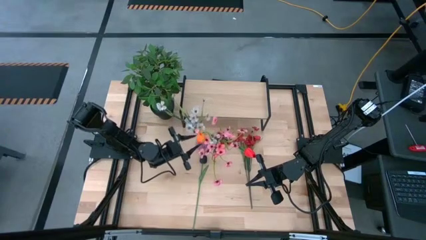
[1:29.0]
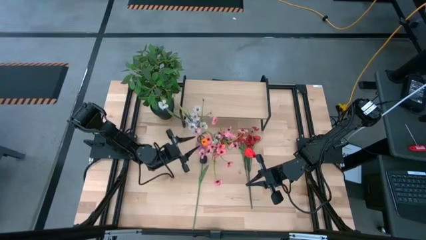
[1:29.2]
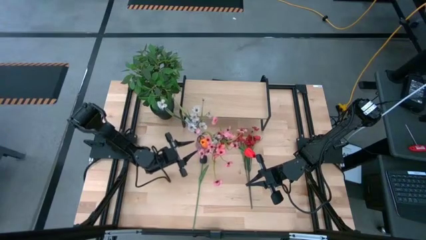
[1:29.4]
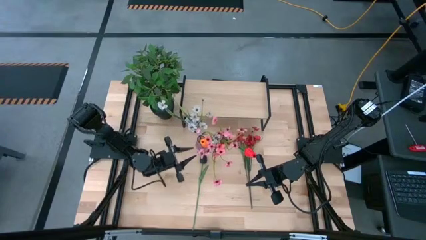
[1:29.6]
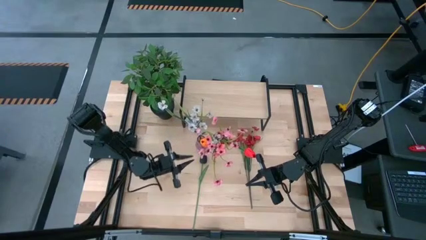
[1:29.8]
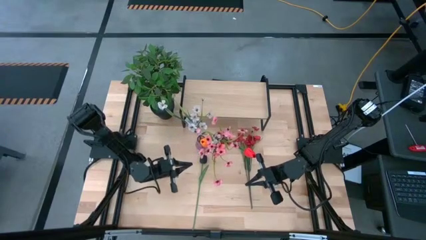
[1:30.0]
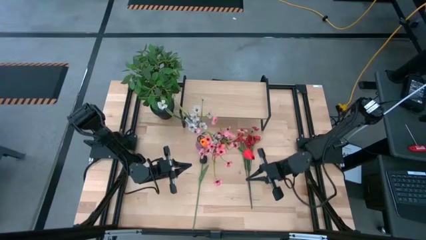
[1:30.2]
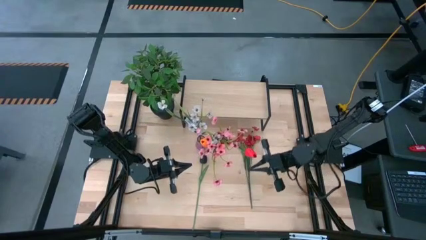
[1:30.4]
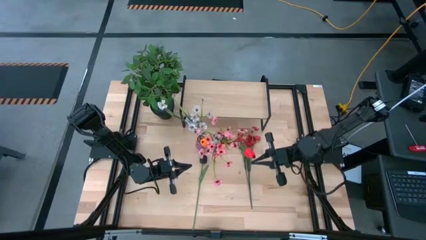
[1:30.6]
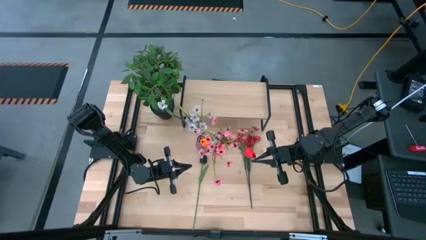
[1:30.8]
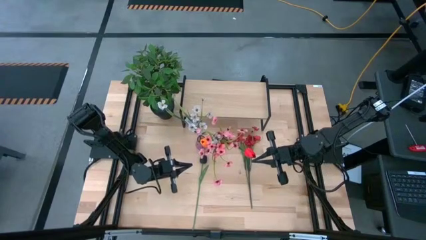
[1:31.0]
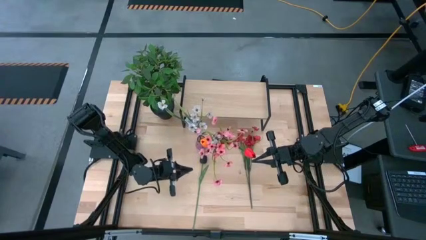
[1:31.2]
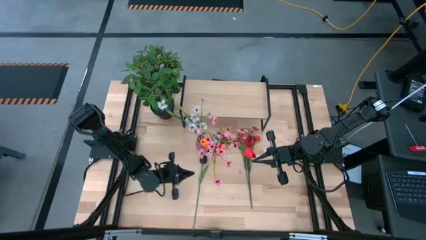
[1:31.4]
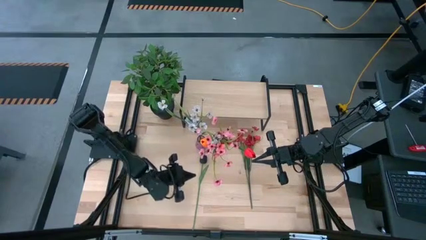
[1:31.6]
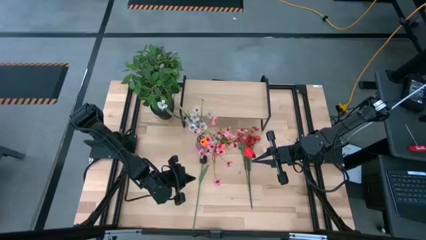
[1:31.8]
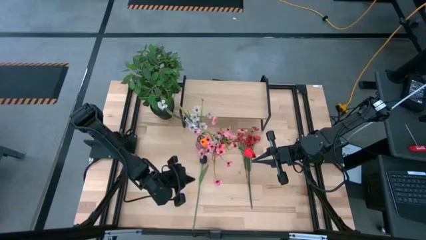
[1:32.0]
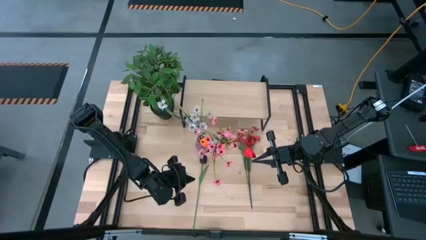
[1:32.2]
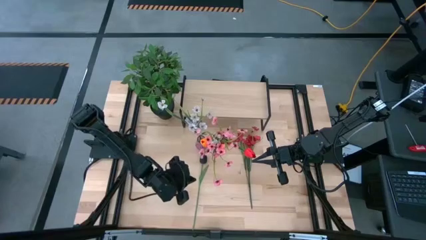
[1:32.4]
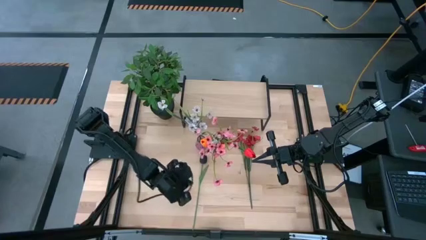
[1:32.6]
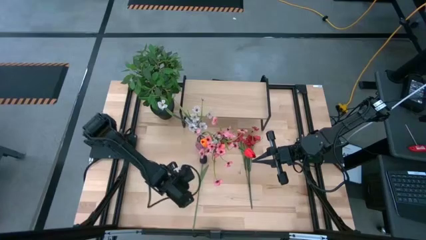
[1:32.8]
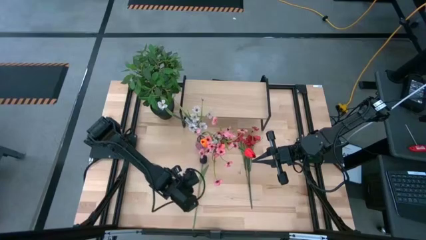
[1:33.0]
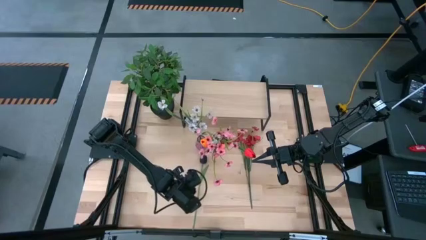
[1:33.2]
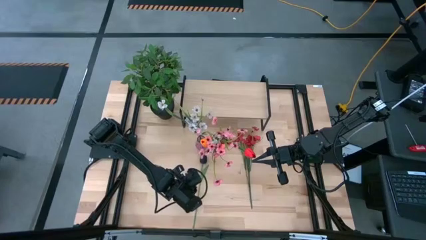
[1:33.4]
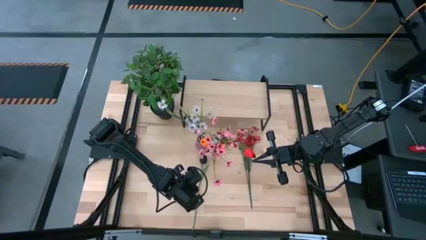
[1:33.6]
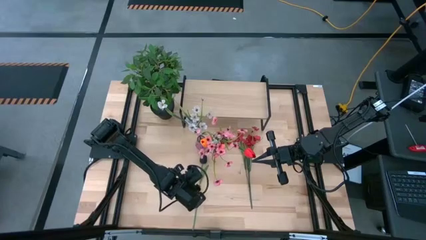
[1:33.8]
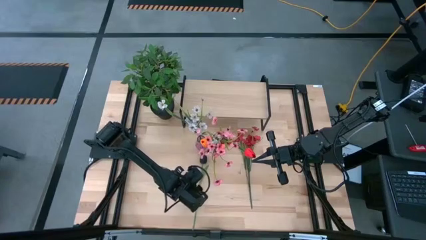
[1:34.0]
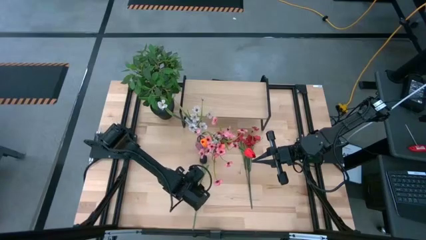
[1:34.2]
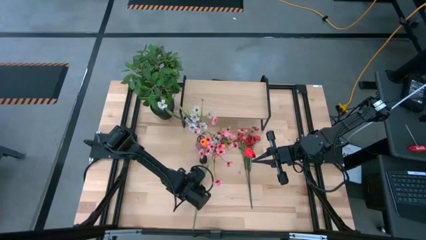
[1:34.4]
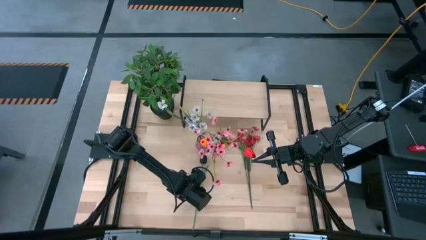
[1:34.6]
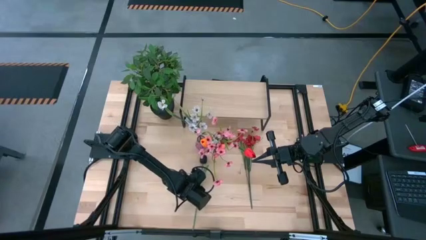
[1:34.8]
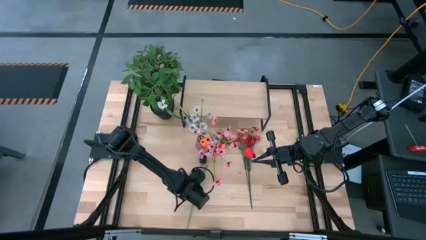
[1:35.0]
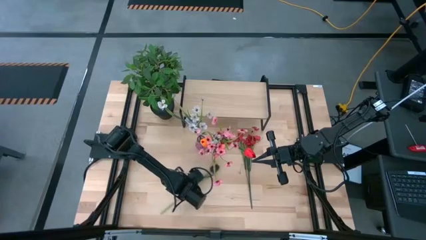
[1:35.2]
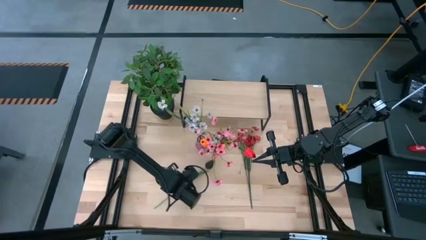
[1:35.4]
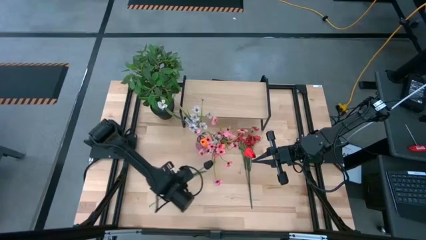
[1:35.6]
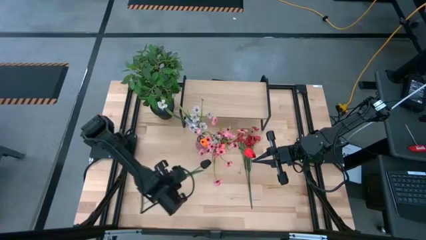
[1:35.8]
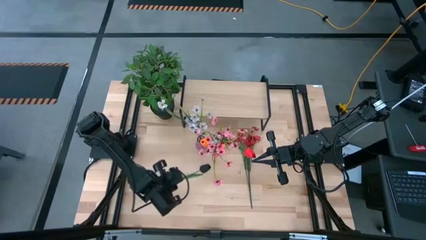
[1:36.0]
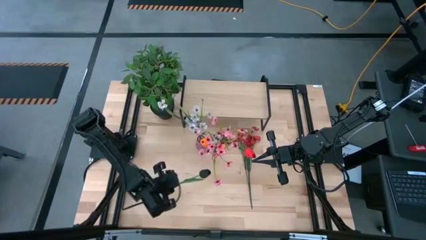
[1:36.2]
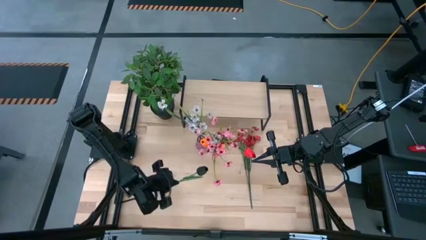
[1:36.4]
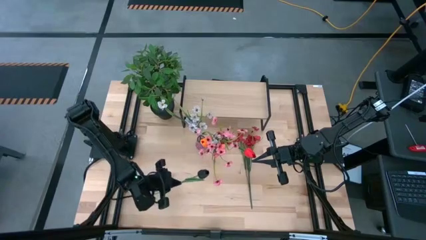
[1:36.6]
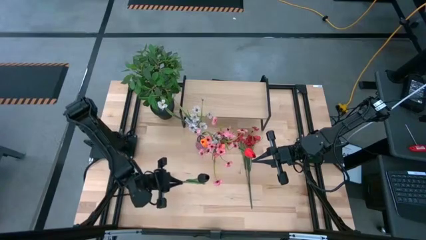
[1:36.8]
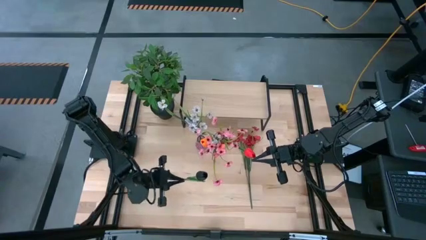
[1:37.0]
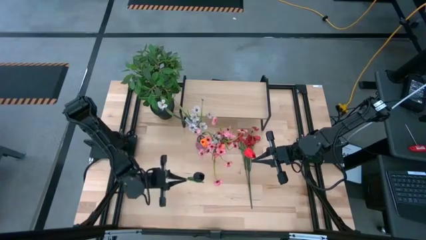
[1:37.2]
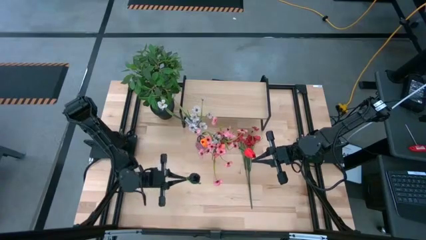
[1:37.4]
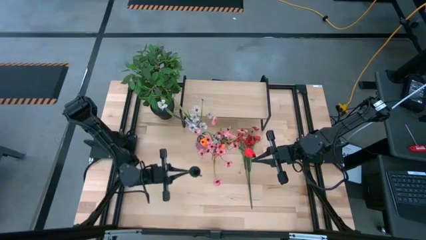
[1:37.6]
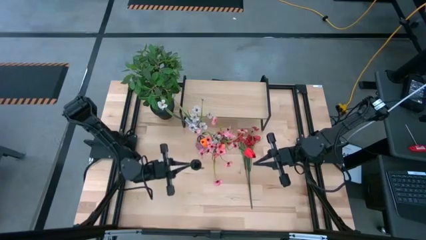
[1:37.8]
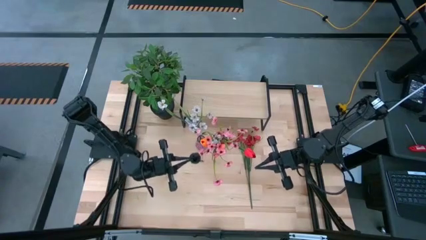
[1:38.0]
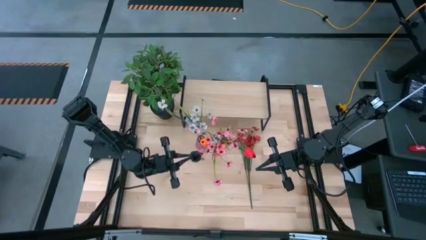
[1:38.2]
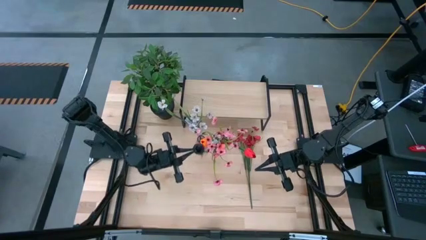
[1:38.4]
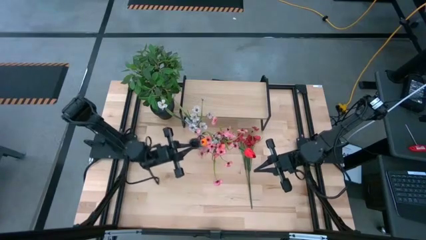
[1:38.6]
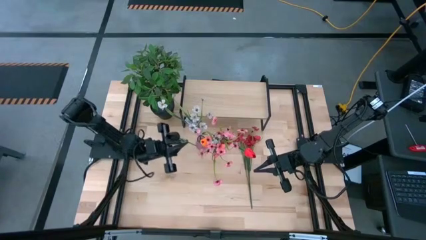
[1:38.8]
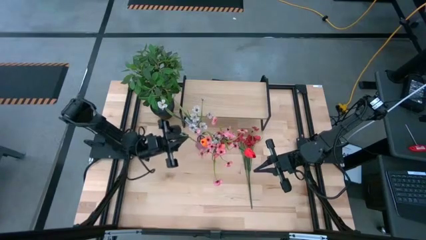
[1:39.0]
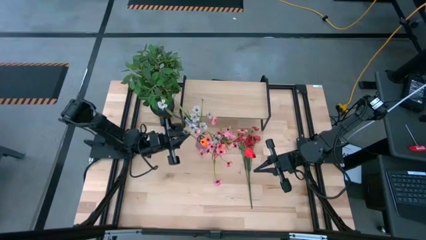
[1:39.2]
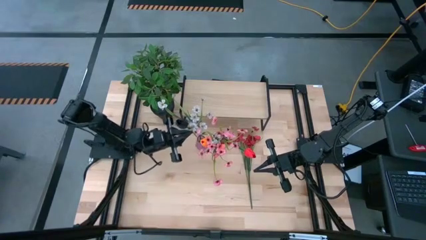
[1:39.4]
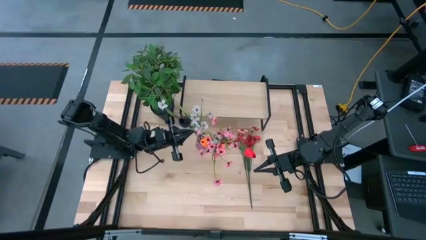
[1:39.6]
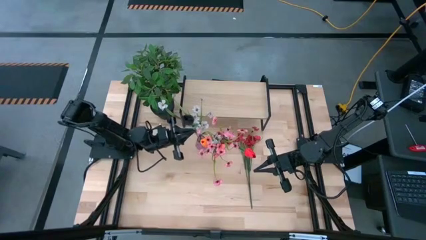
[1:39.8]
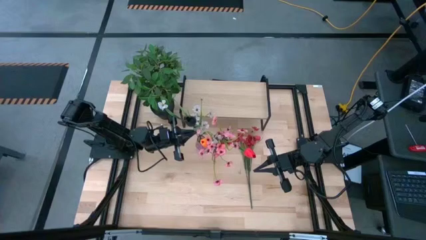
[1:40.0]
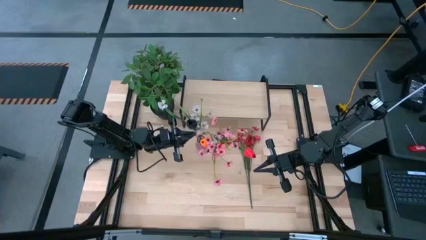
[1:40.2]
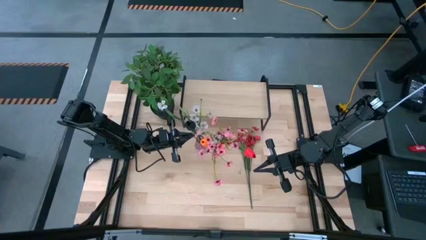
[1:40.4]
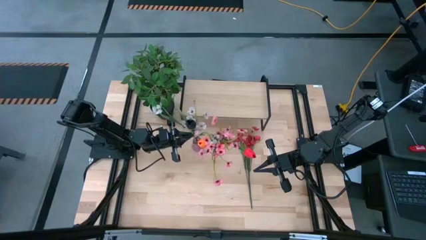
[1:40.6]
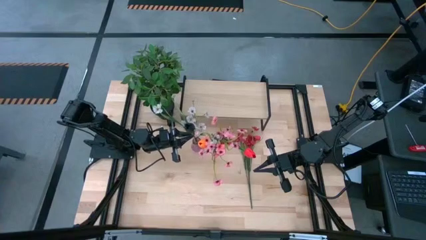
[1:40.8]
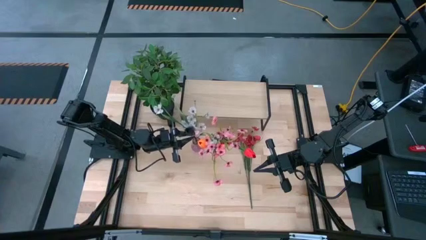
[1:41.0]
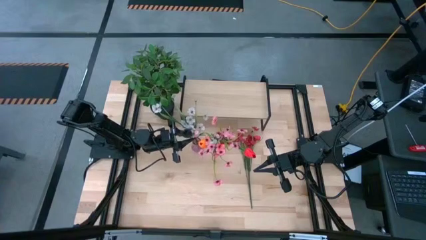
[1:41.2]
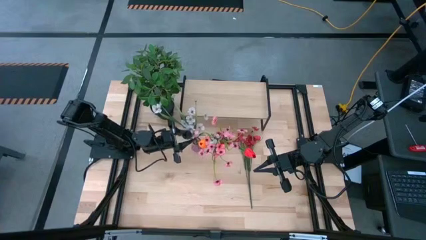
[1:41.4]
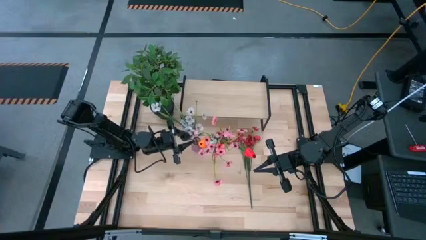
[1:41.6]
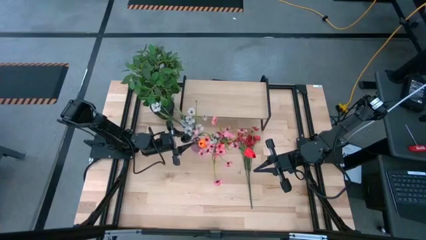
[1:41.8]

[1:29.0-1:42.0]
Task: Pick and place flowers into a vace then onto a shelf
Put the black flower into the purple vase

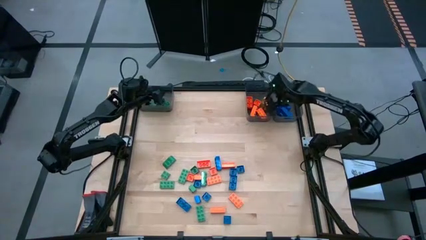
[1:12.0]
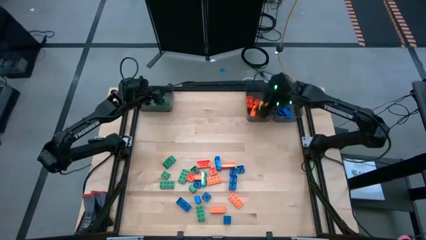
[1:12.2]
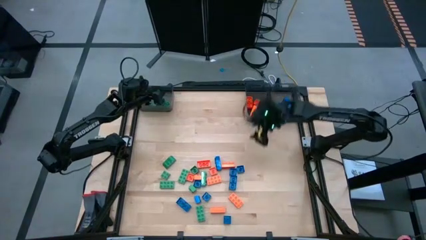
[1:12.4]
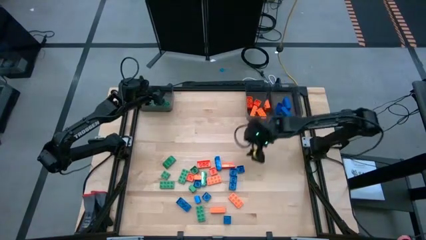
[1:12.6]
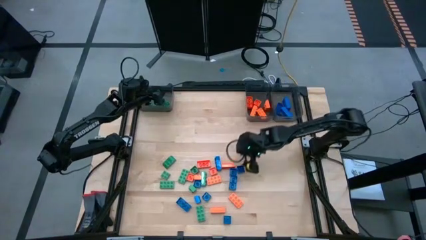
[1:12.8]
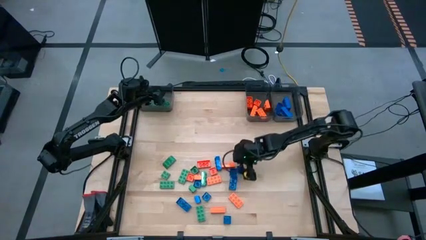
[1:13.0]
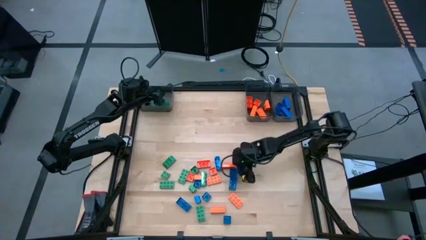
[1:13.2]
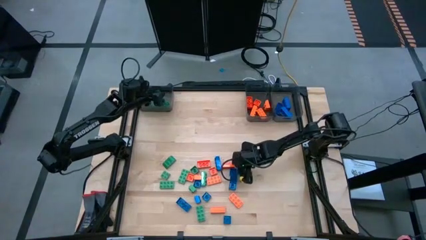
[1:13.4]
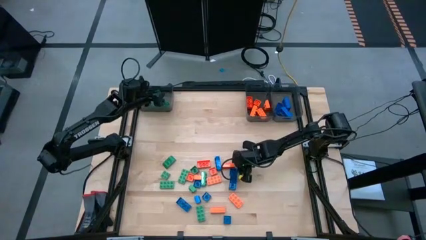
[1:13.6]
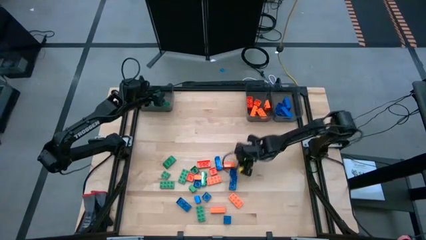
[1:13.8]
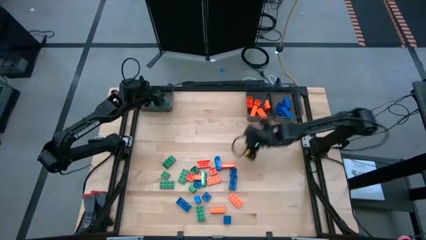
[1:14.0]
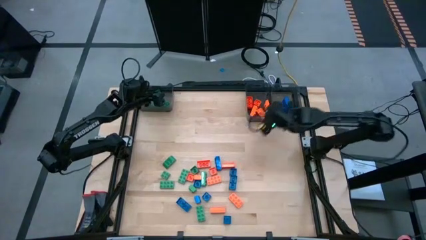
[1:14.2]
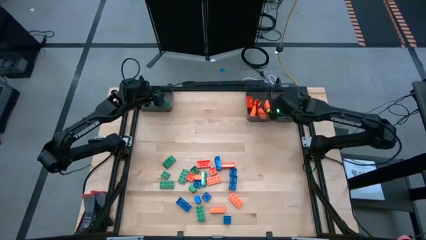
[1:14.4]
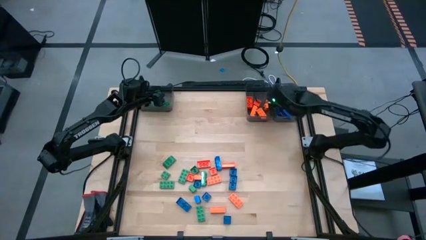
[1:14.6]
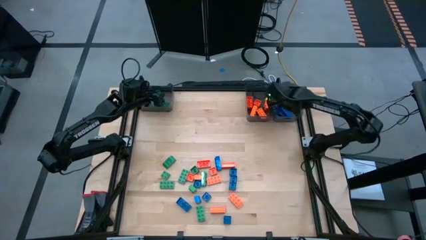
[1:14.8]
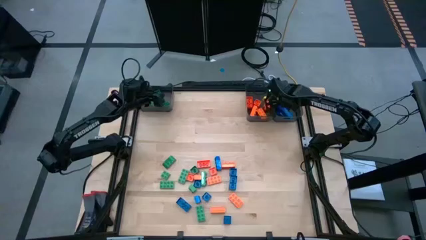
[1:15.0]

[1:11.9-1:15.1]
Task: Sort blocks
Put the blue game piece into the right black bin
